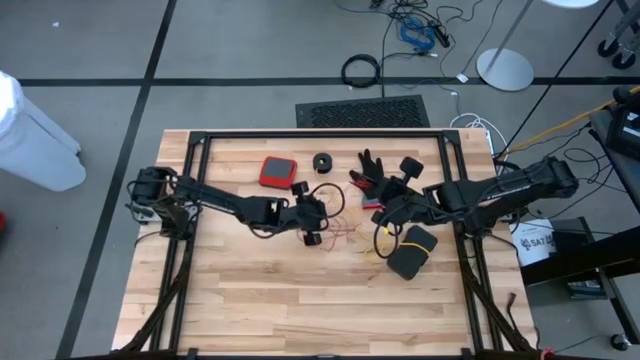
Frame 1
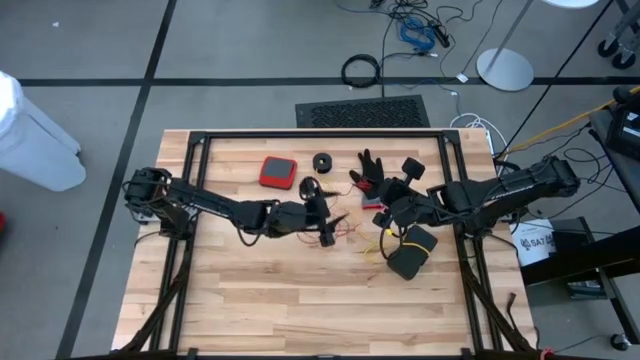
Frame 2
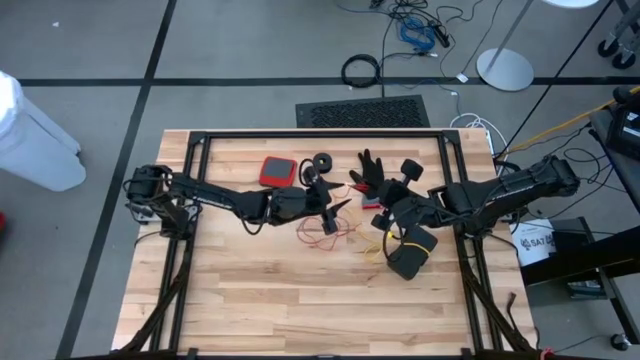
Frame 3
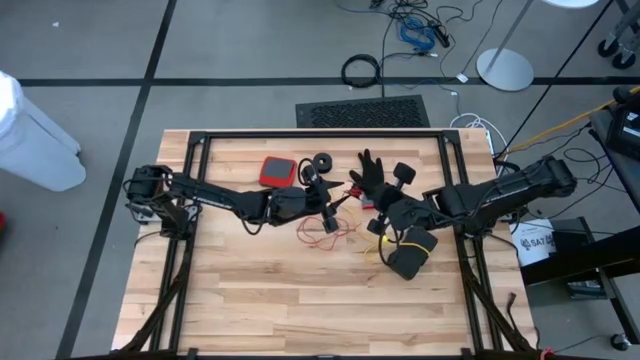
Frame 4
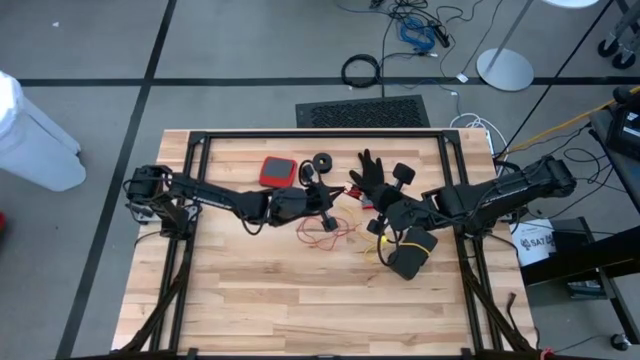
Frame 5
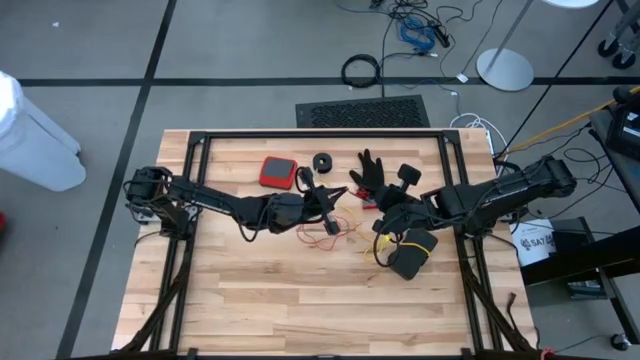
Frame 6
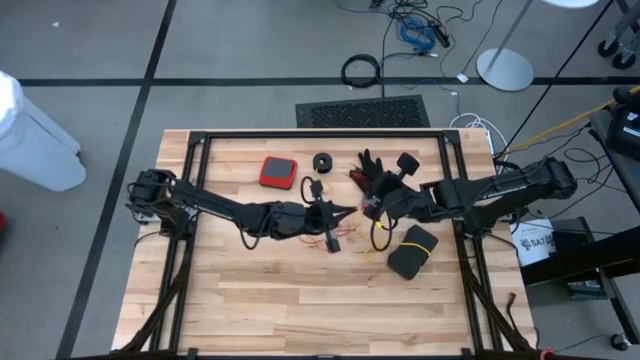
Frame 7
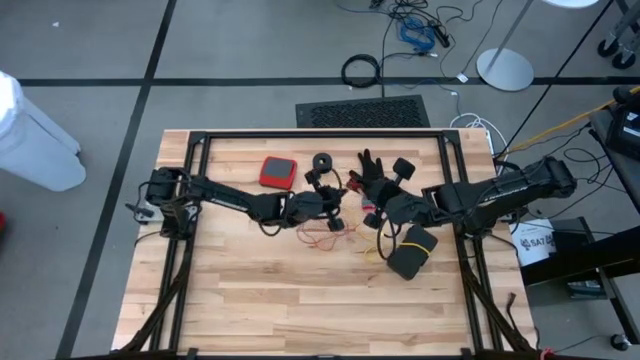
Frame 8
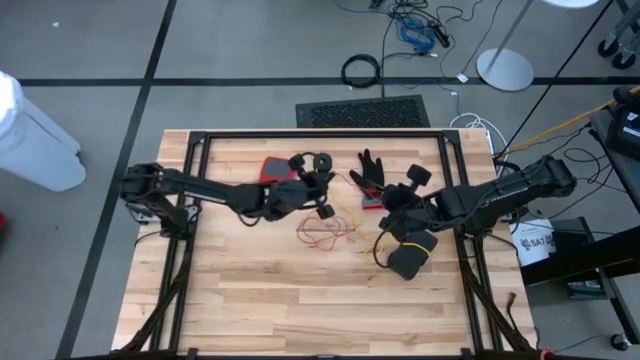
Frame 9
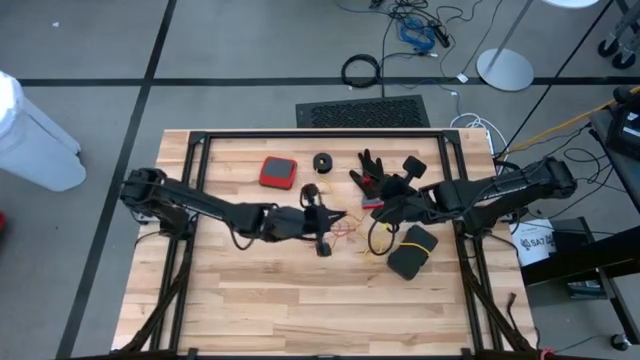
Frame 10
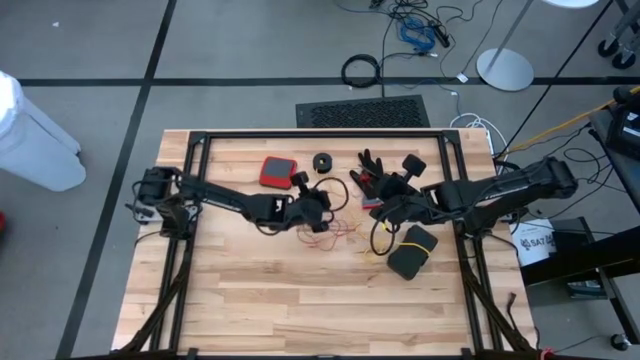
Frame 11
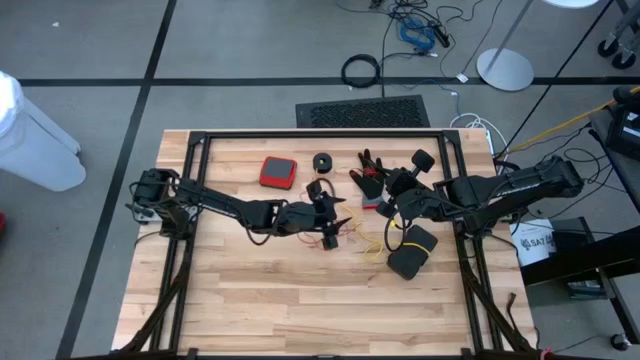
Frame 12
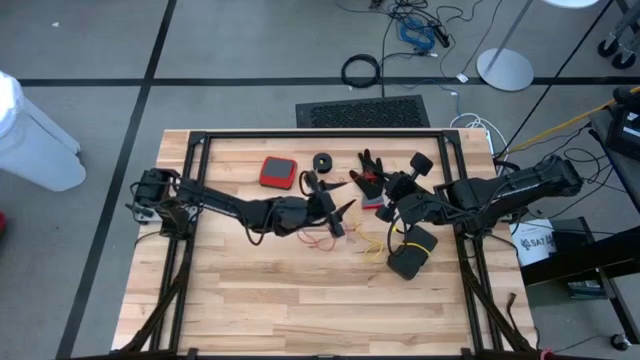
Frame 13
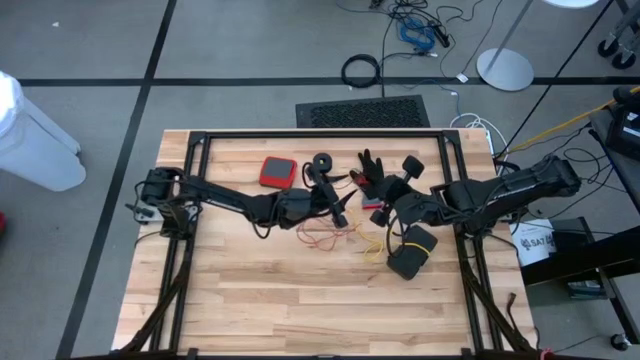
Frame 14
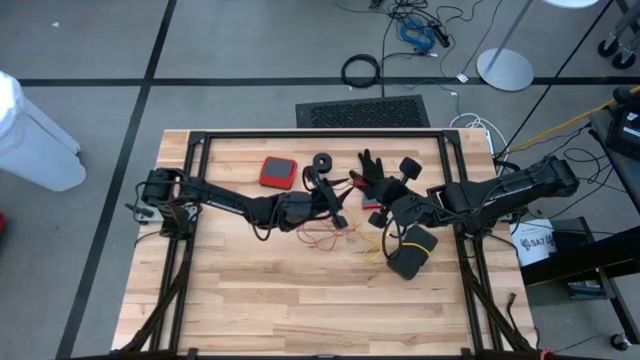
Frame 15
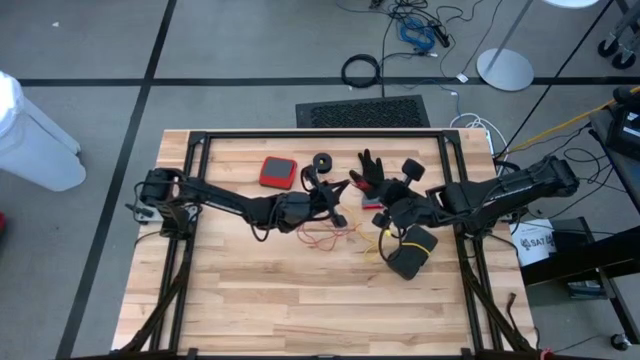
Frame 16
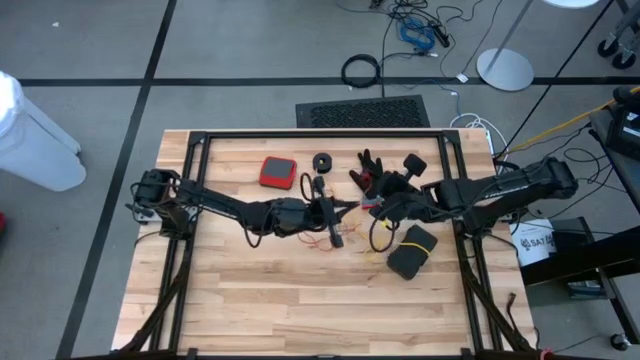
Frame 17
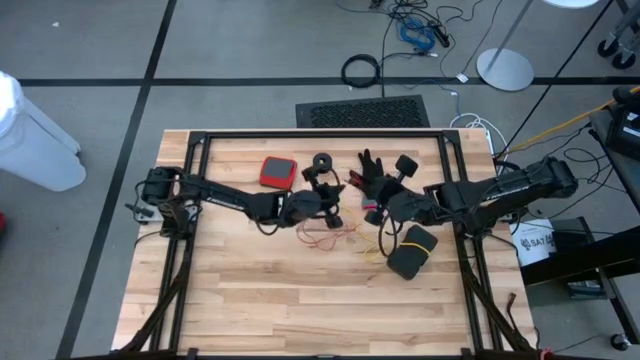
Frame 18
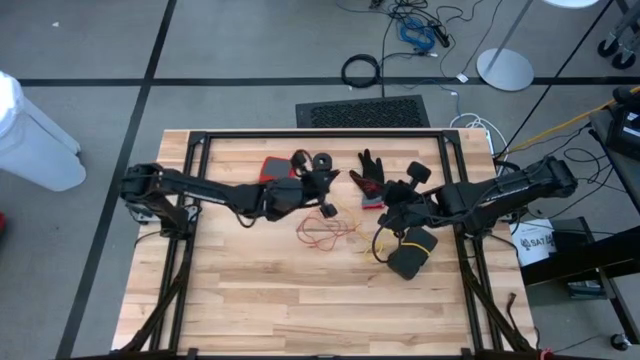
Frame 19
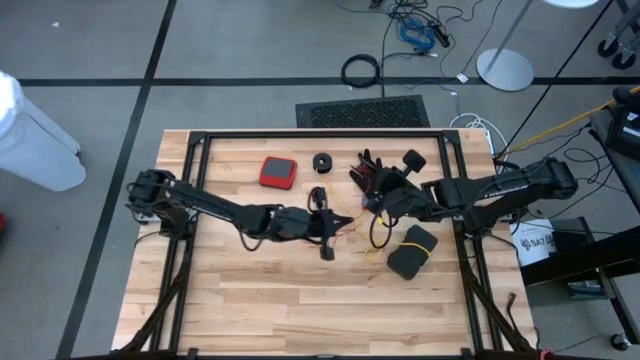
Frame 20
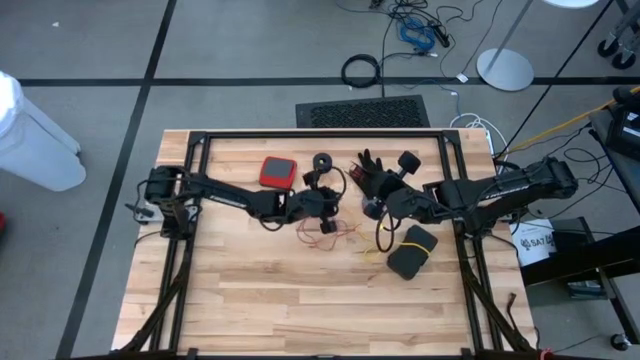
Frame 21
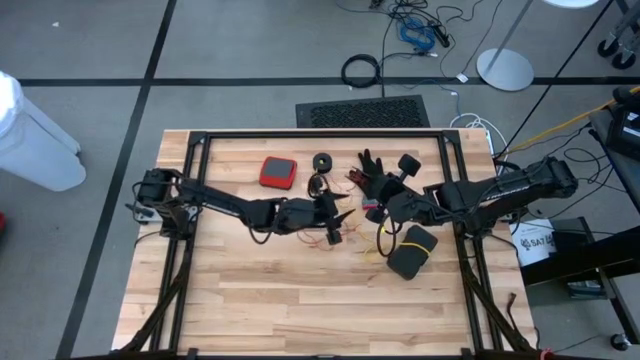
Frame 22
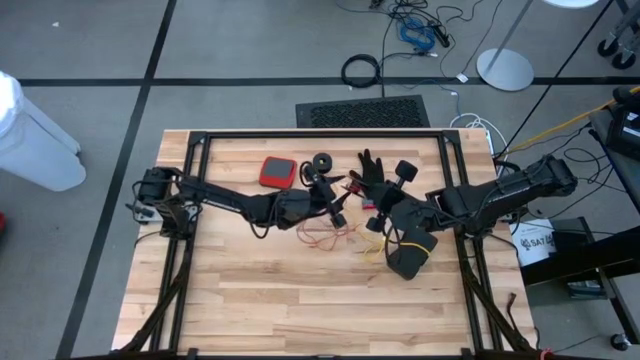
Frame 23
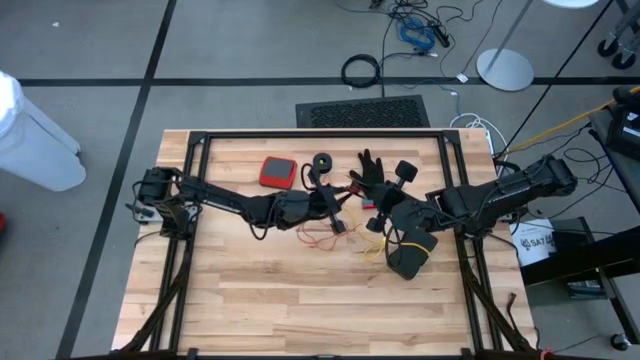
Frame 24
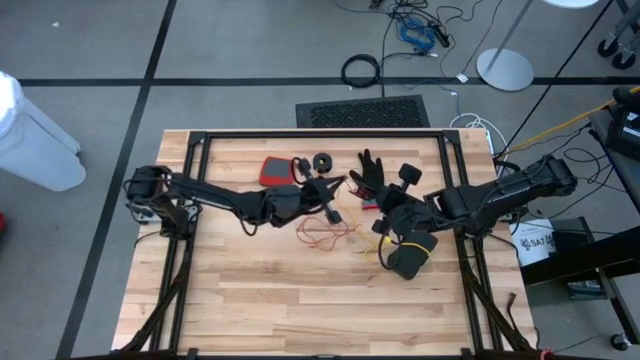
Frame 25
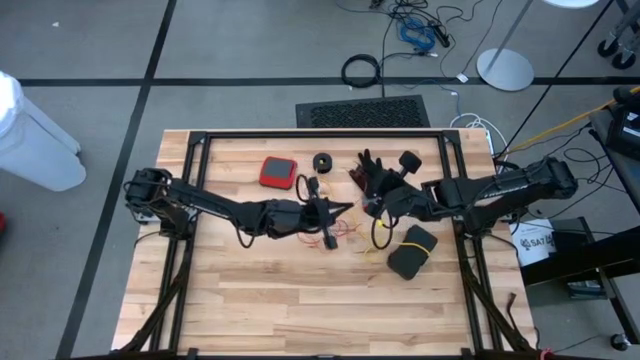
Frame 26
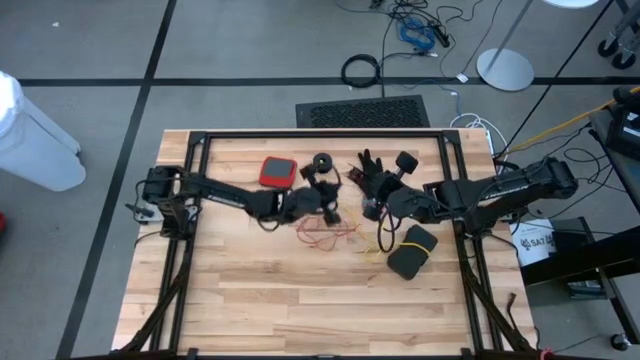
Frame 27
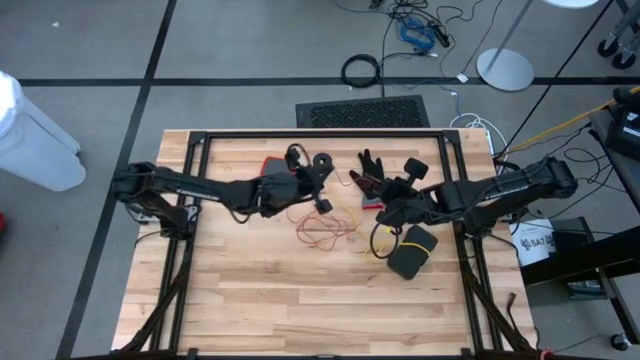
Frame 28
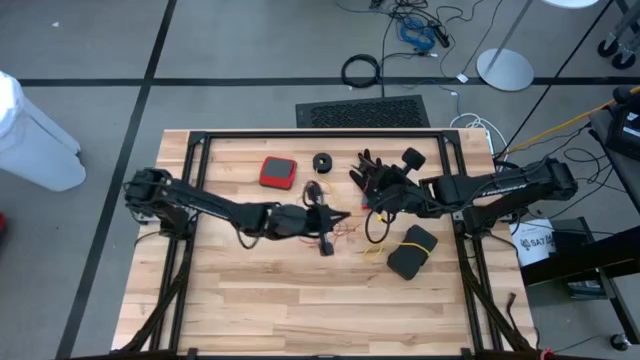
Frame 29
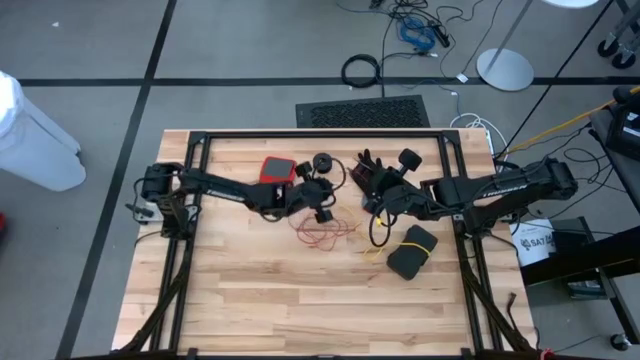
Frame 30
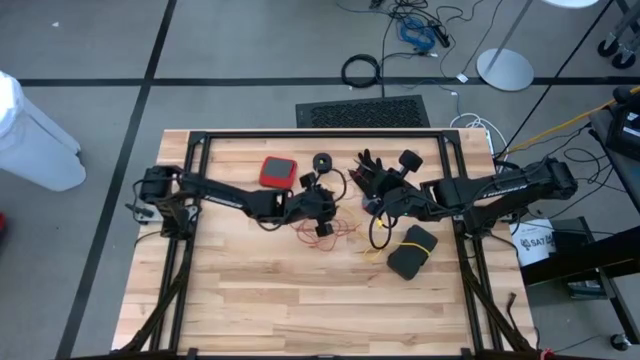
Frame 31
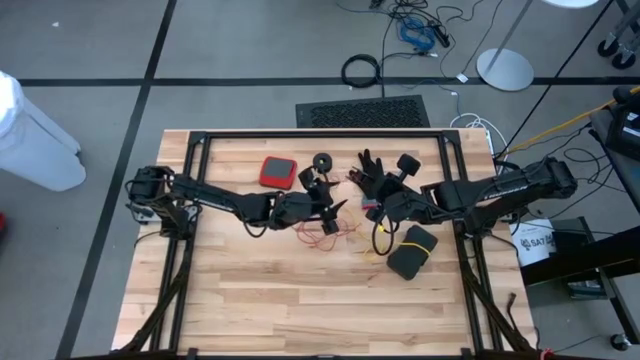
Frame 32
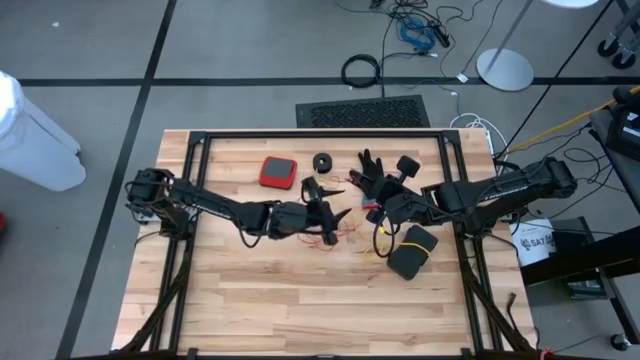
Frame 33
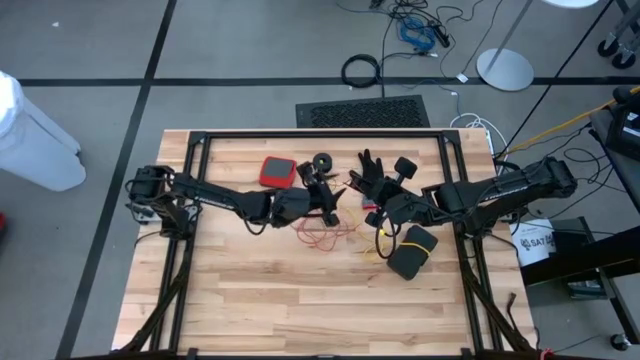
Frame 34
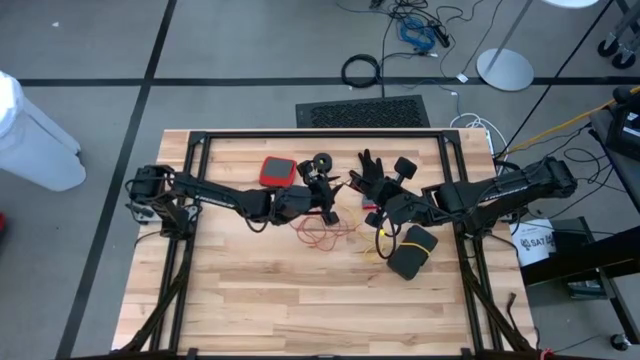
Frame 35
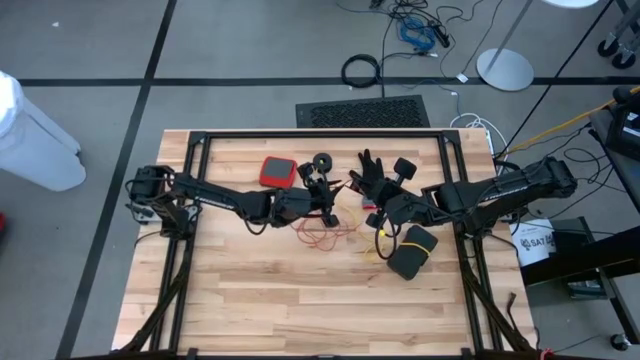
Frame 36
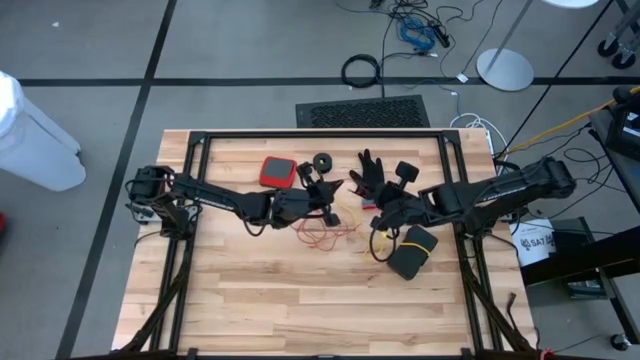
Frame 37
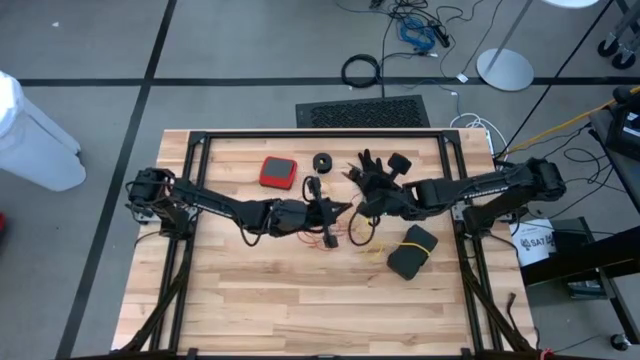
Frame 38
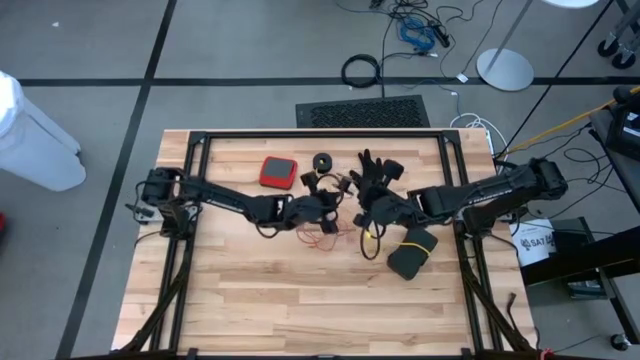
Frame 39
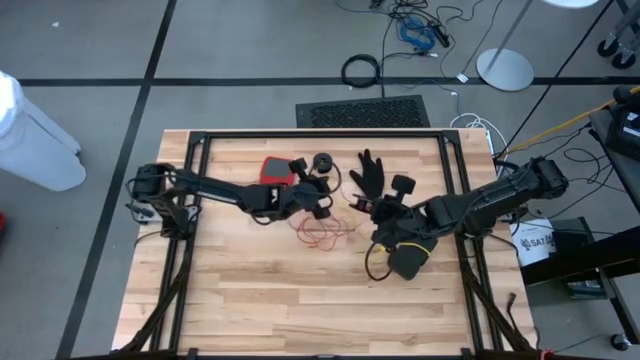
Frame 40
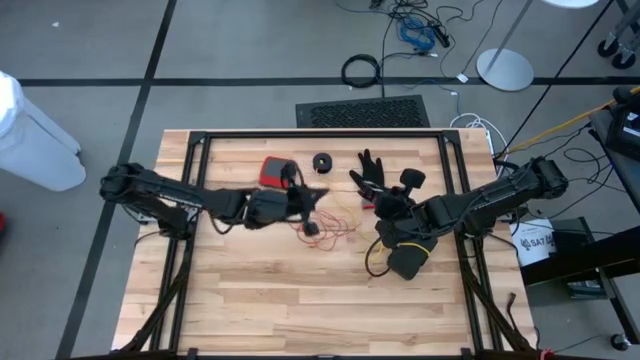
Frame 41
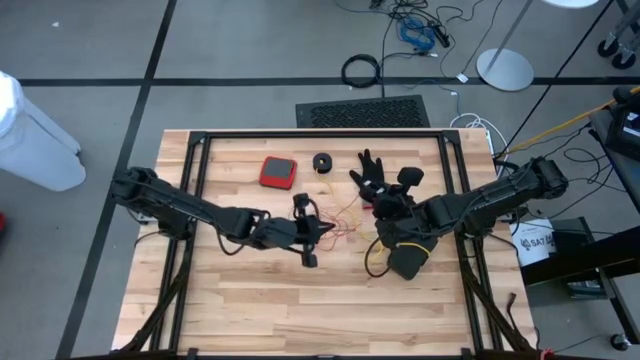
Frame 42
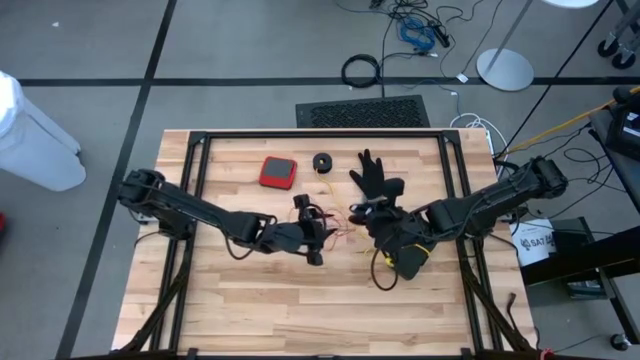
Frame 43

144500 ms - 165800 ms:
Task: Coil cords
Uncoil the red wire from the spool
